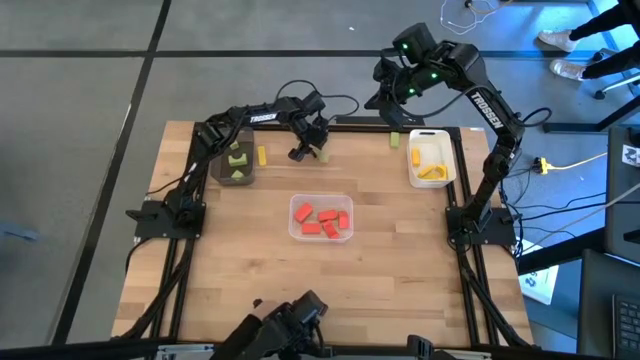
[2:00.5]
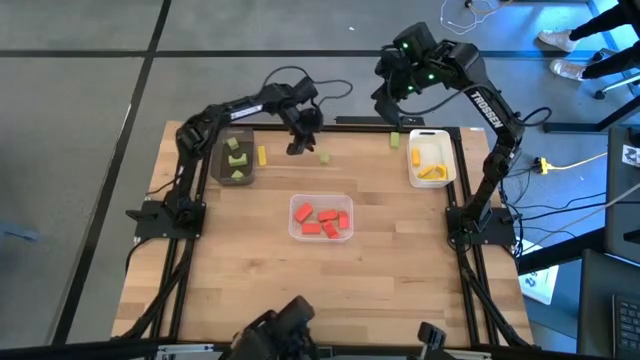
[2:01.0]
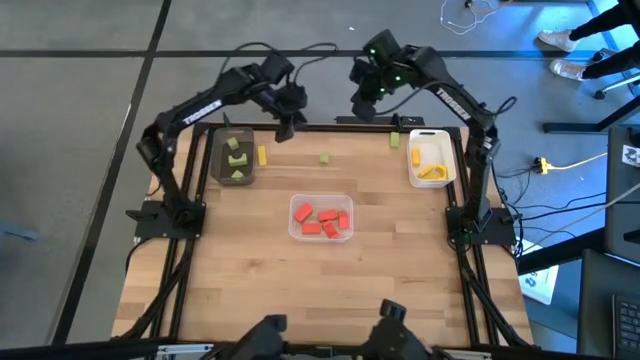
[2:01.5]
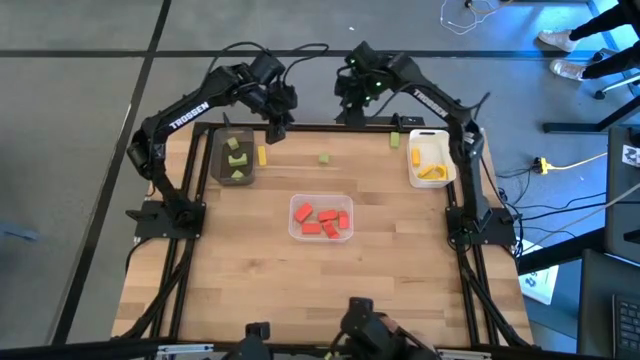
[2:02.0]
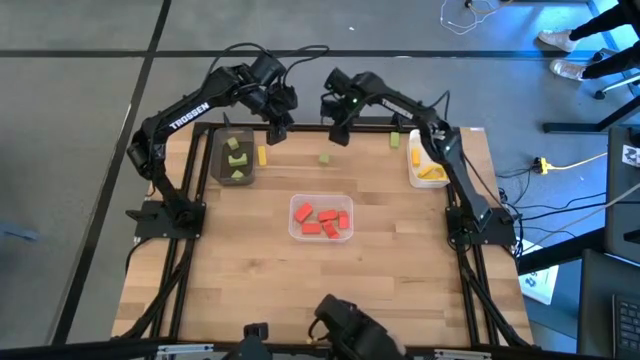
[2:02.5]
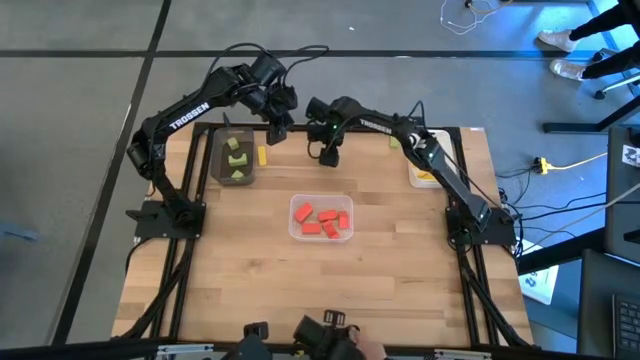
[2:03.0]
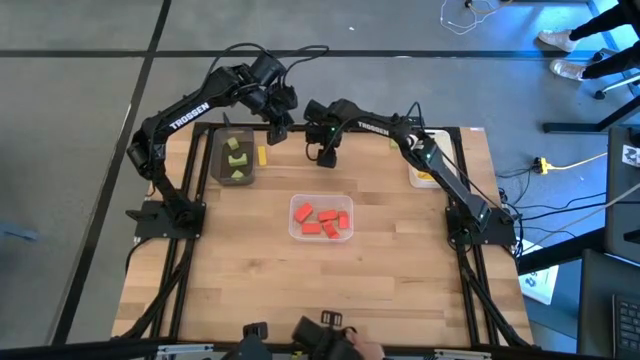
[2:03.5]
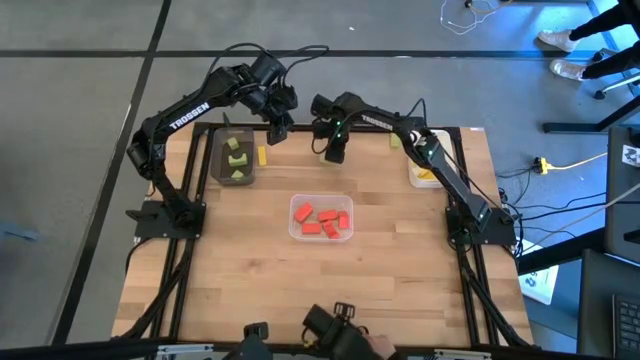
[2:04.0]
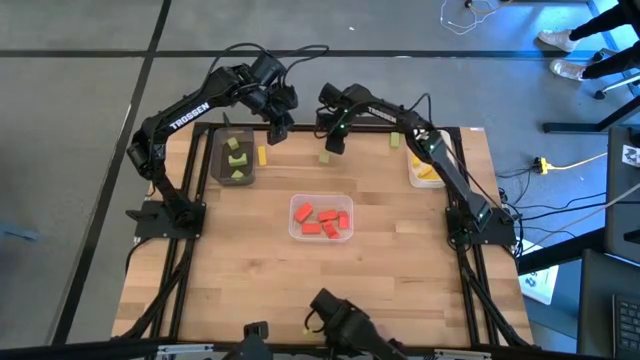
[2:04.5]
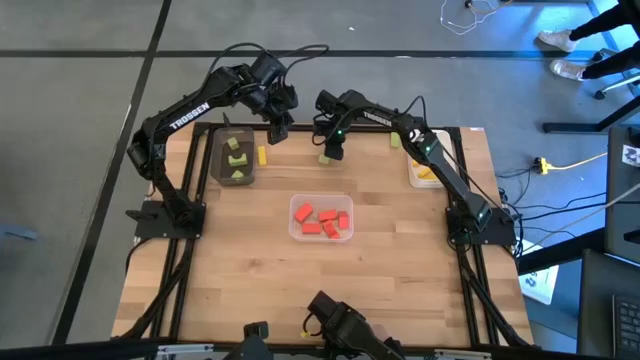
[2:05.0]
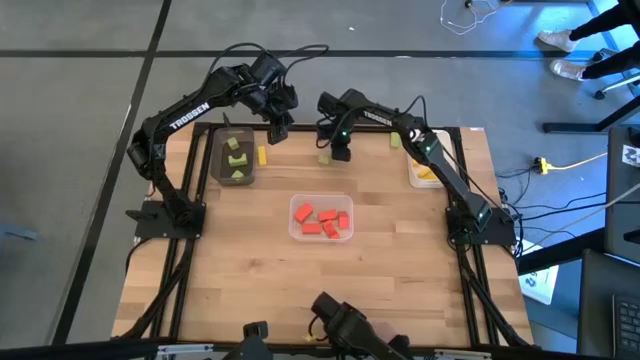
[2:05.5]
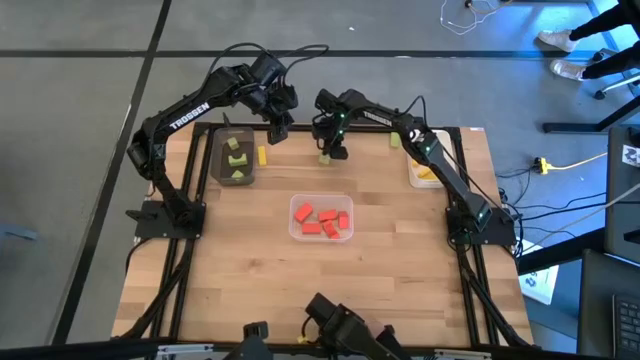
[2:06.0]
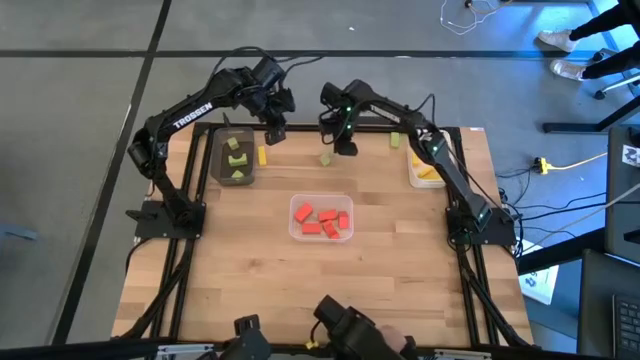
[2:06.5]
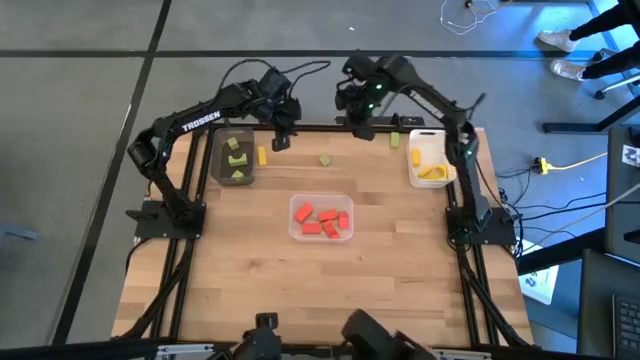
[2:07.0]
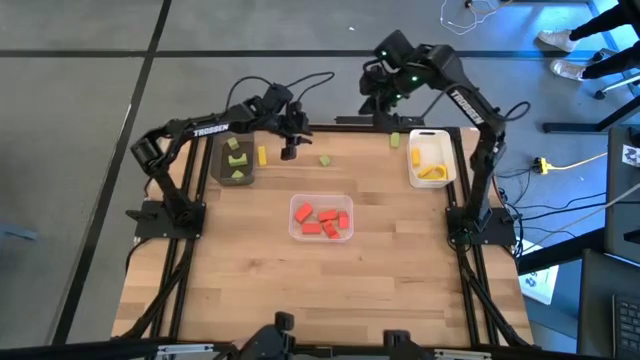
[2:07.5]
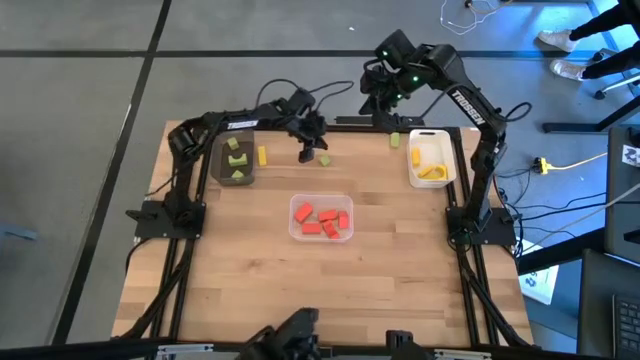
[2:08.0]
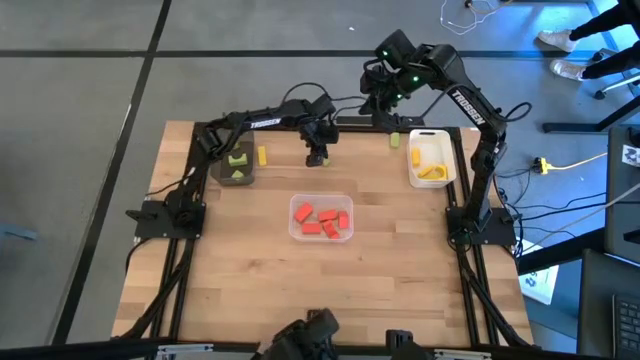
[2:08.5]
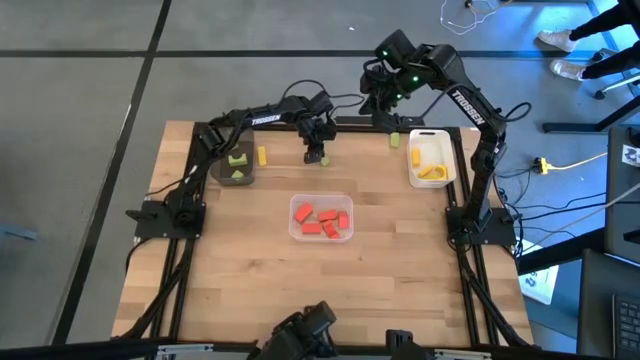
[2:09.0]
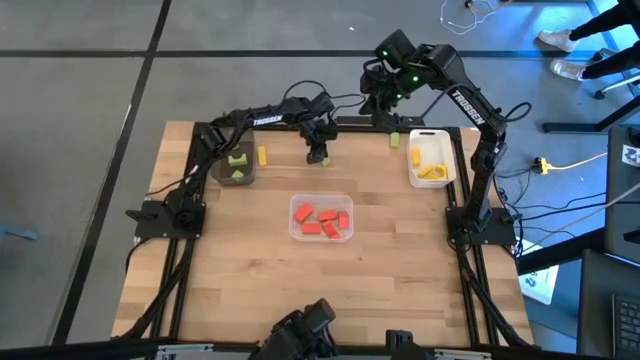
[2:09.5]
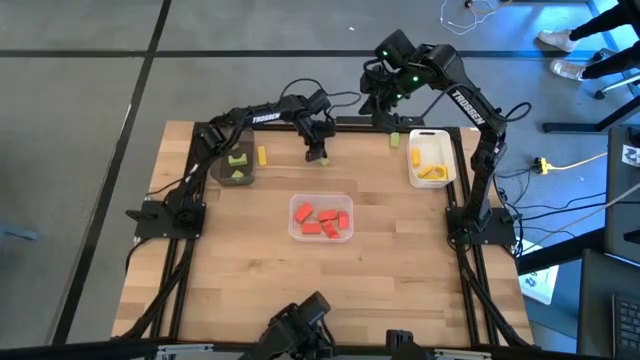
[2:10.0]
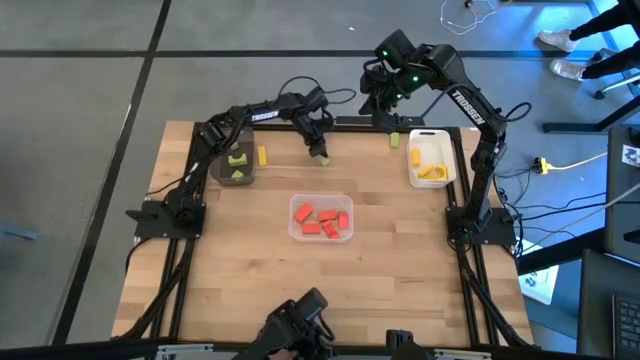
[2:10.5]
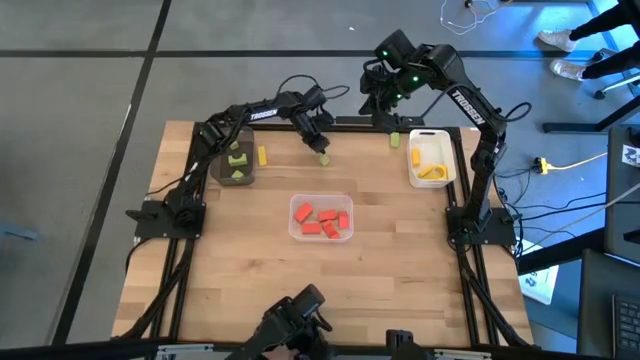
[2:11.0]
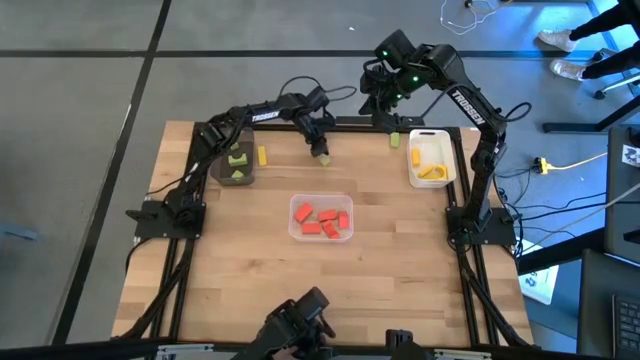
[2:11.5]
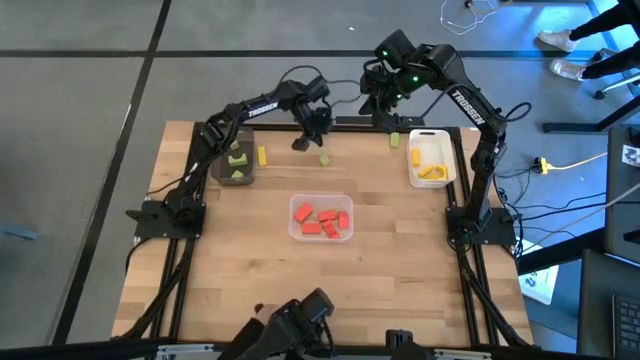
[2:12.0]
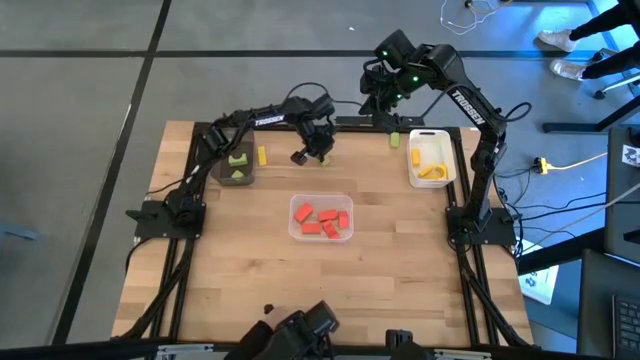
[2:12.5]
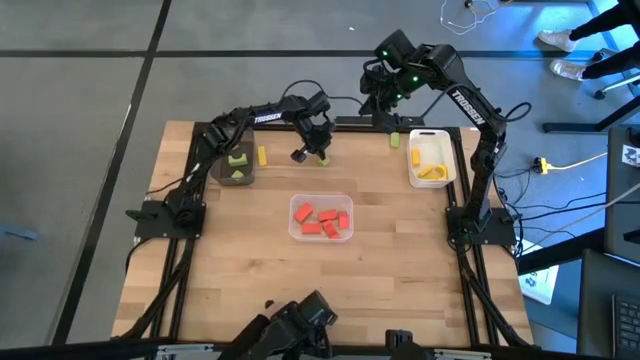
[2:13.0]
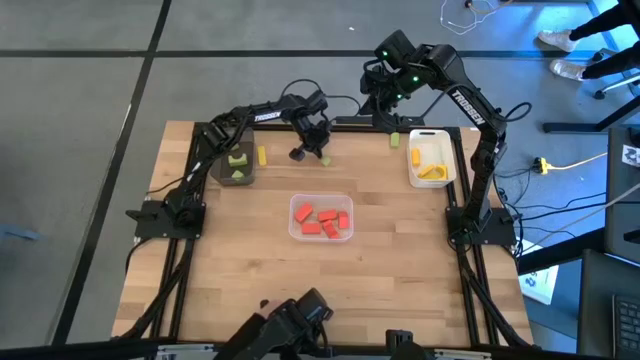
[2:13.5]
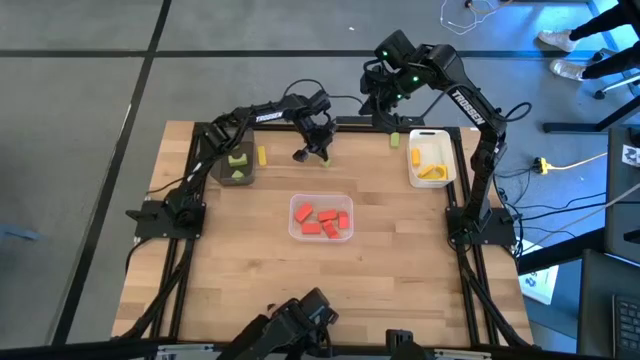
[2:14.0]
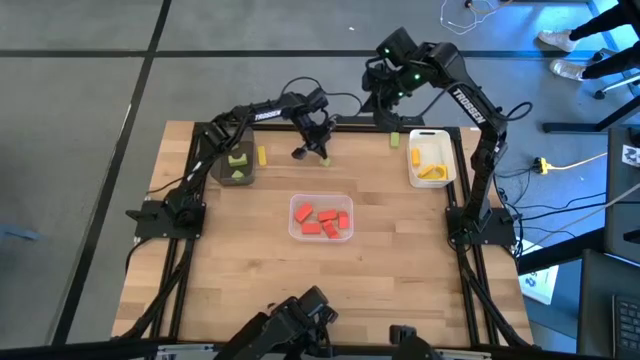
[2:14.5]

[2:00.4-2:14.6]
Task: Sort & place blocks by color
Put the green block into the black bin

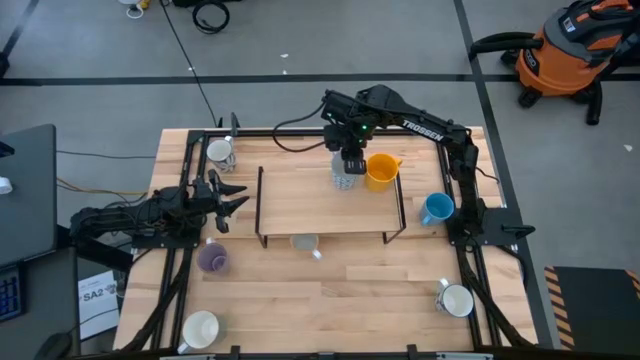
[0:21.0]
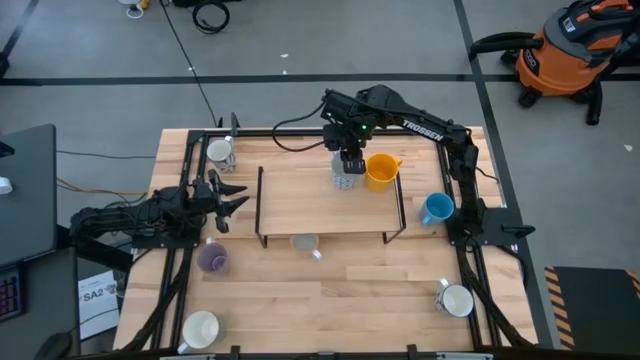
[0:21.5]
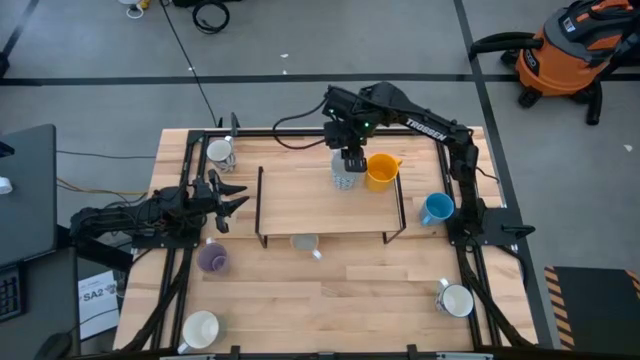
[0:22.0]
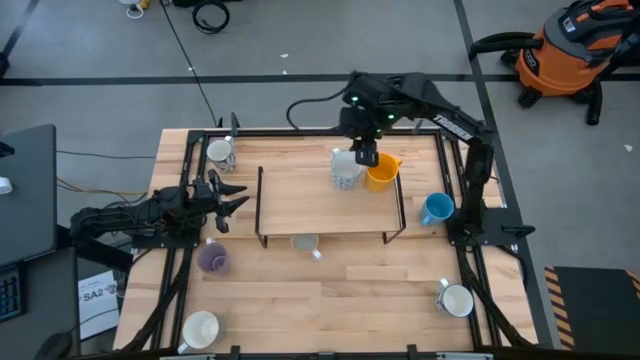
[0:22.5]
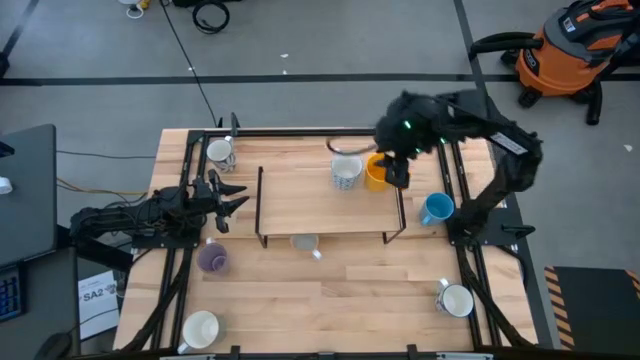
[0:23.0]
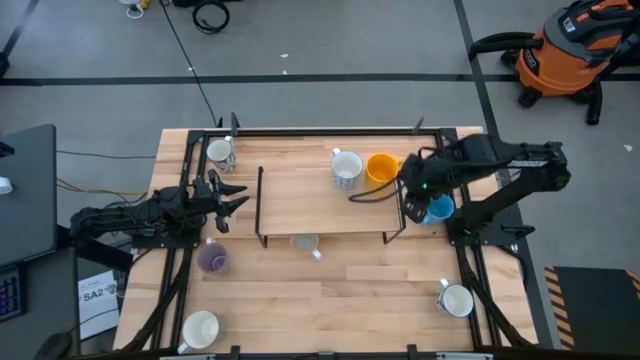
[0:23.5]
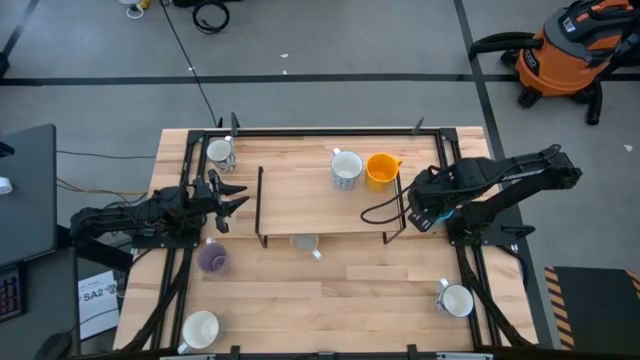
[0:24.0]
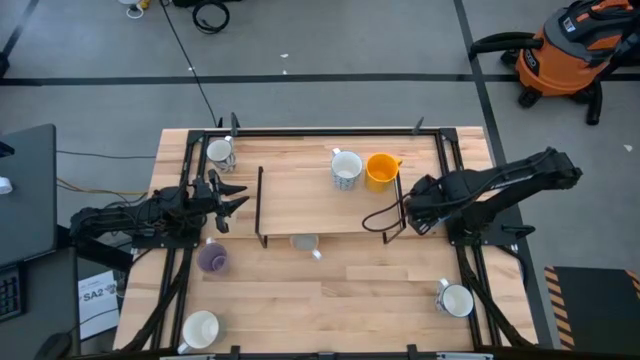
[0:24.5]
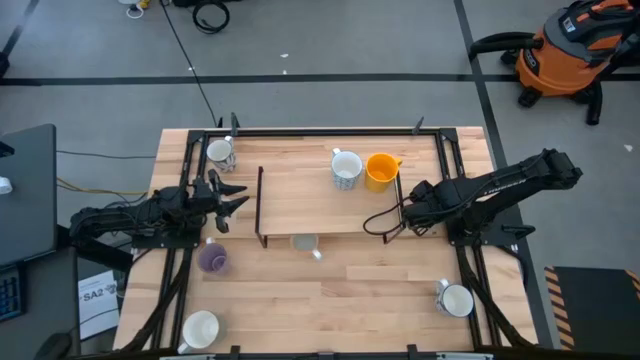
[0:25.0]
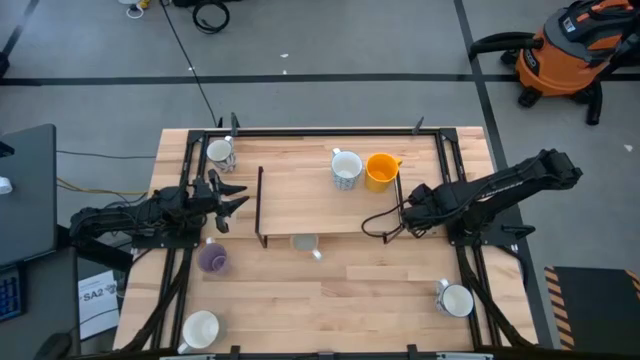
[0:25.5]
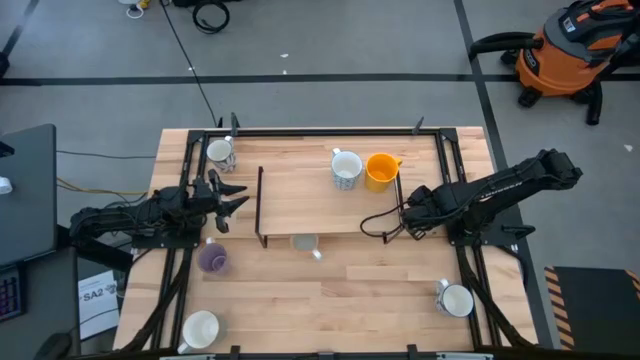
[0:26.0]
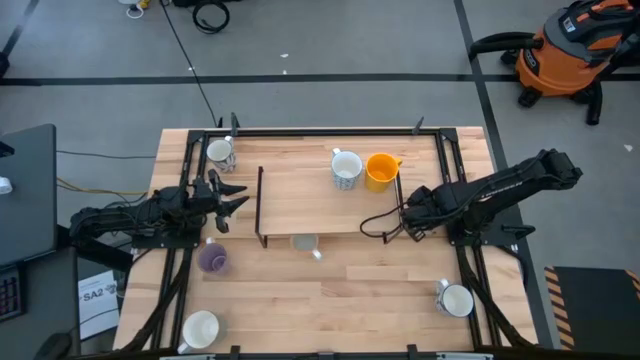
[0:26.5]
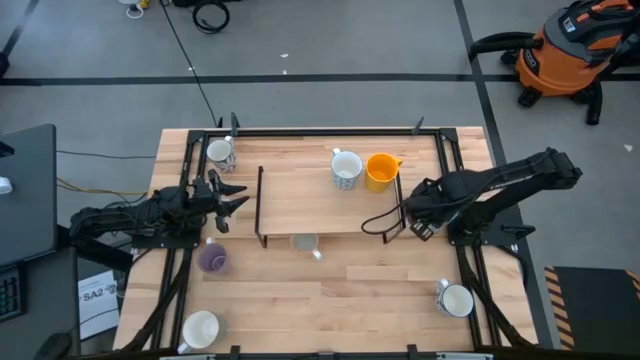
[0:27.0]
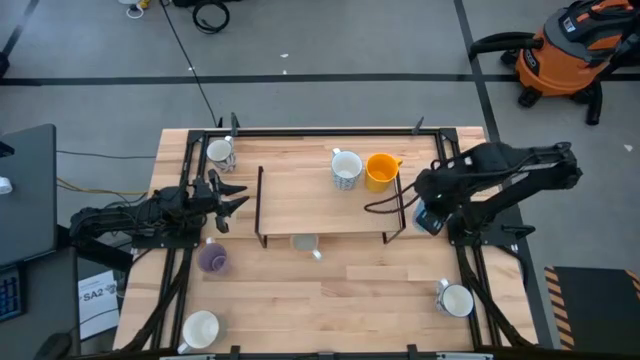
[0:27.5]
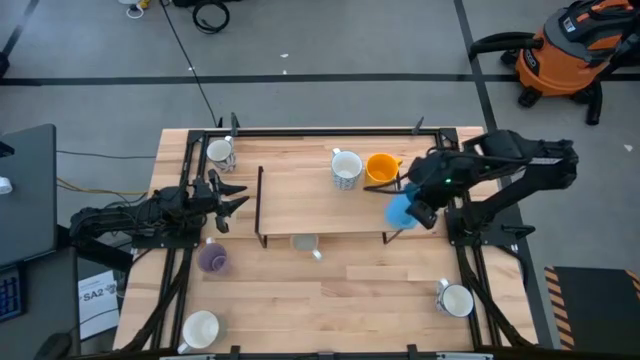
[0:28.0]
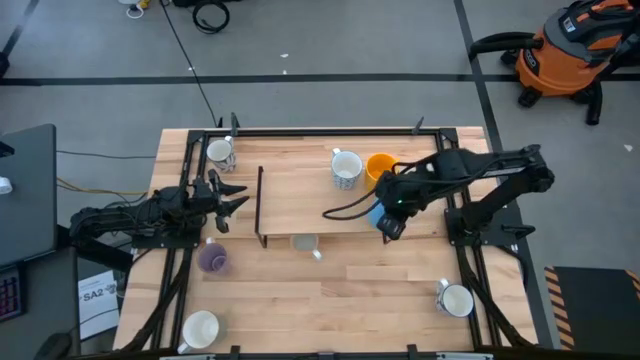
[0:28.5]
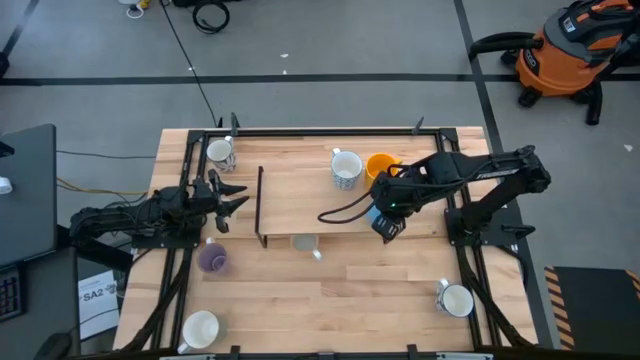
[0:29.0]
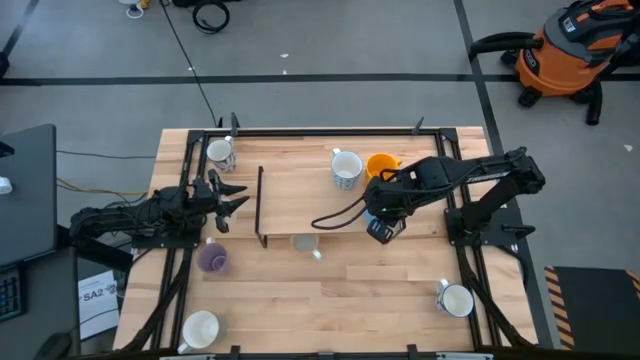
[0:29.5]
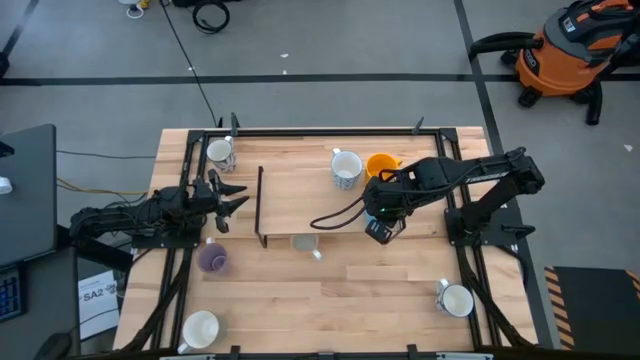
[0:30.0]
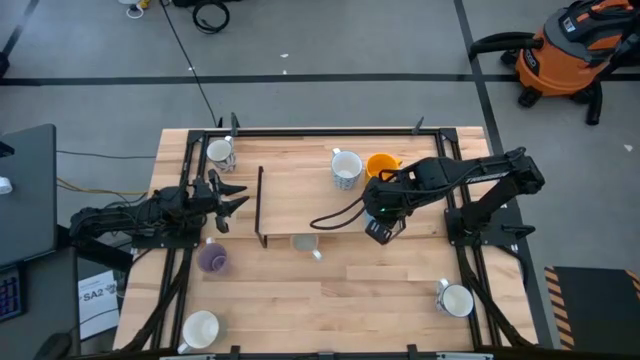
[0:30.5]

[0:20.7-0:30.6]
Task: Place coffee mugs
Put the blue mug on the shelf
